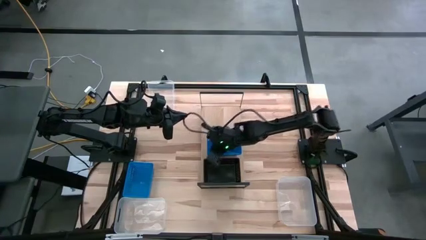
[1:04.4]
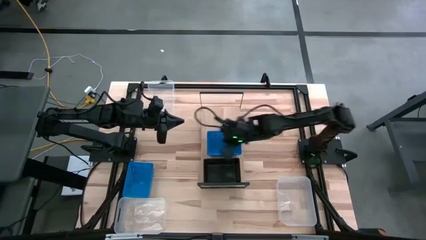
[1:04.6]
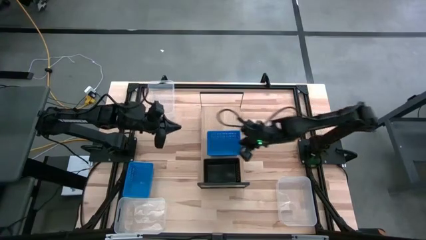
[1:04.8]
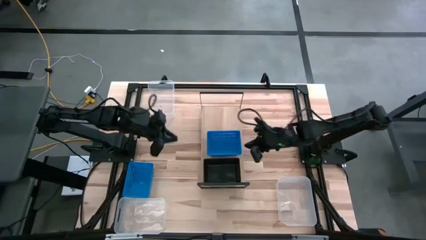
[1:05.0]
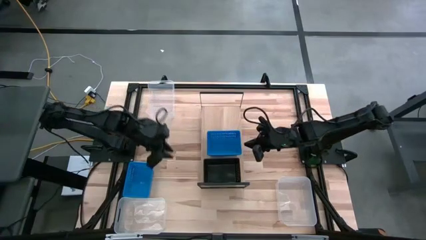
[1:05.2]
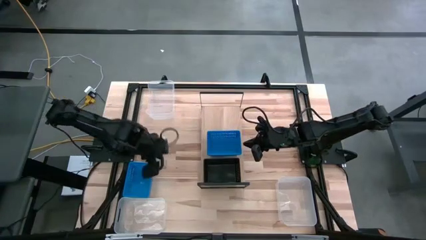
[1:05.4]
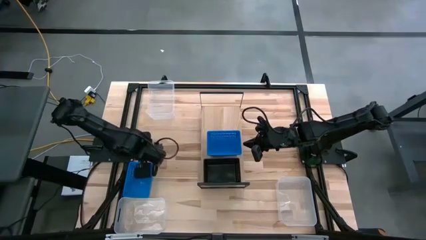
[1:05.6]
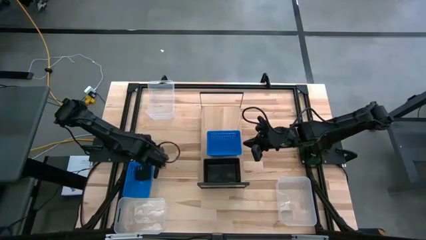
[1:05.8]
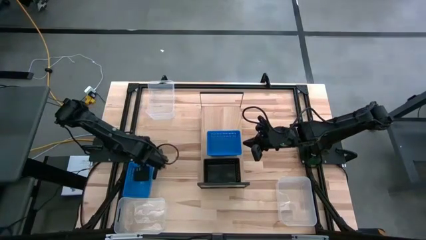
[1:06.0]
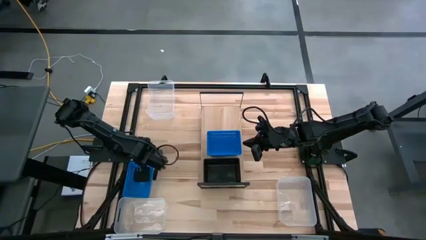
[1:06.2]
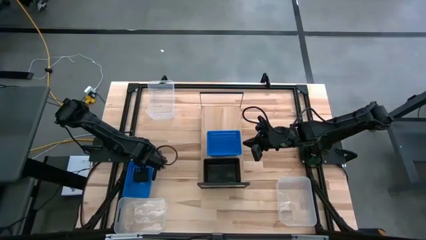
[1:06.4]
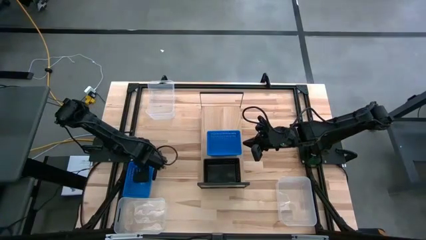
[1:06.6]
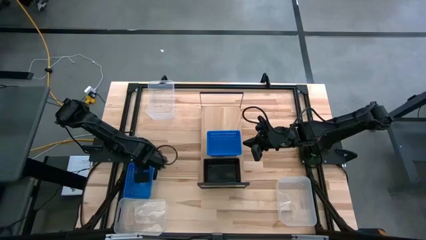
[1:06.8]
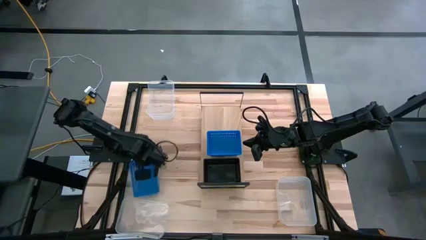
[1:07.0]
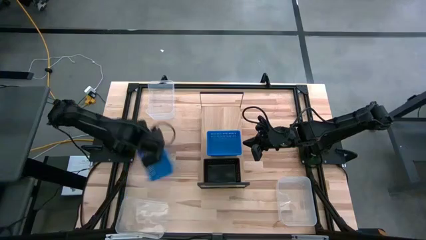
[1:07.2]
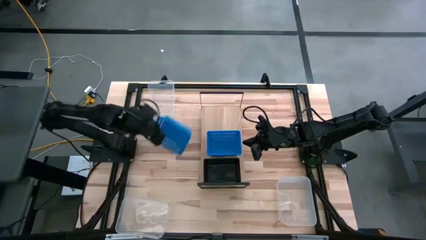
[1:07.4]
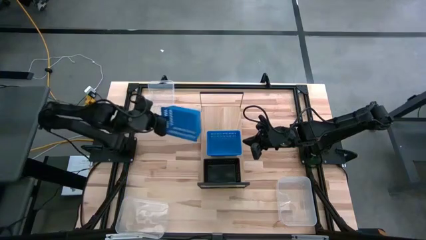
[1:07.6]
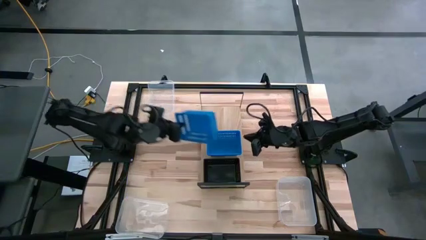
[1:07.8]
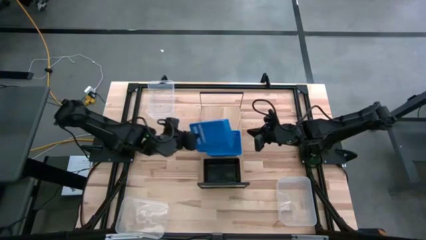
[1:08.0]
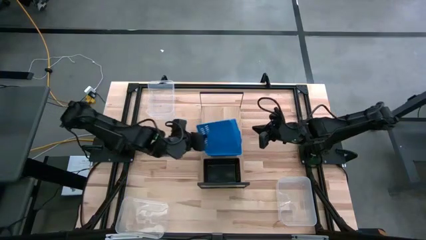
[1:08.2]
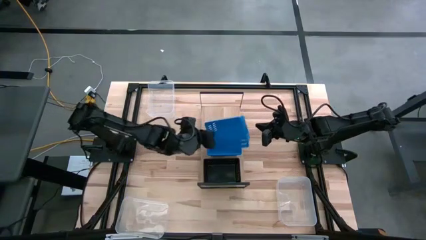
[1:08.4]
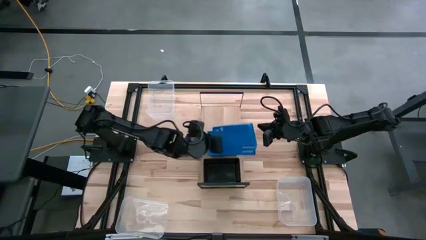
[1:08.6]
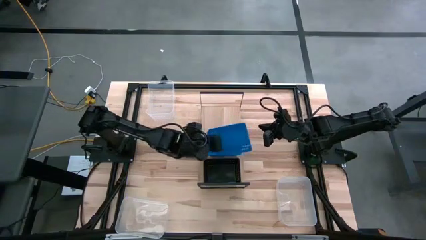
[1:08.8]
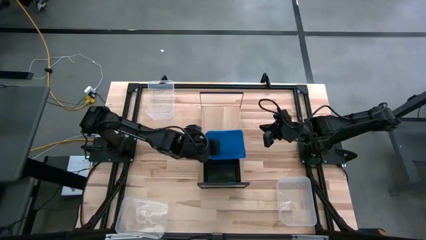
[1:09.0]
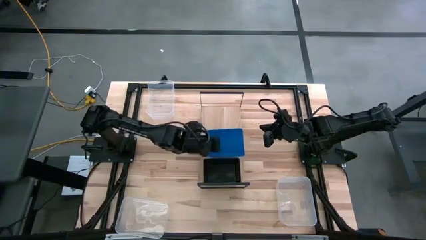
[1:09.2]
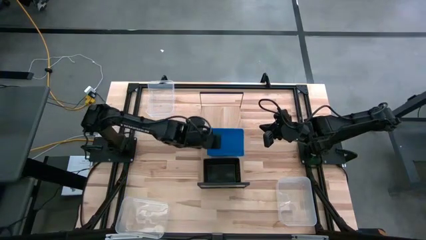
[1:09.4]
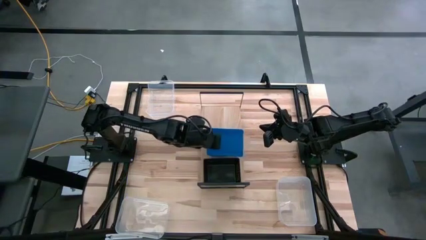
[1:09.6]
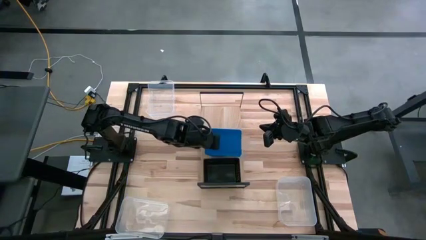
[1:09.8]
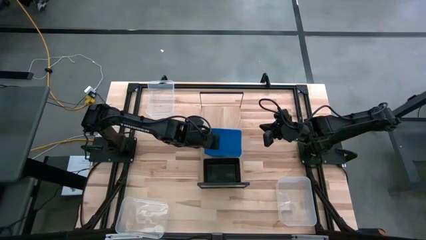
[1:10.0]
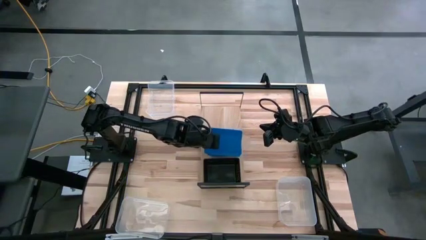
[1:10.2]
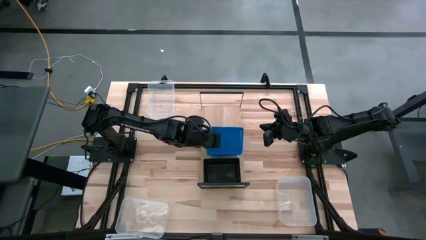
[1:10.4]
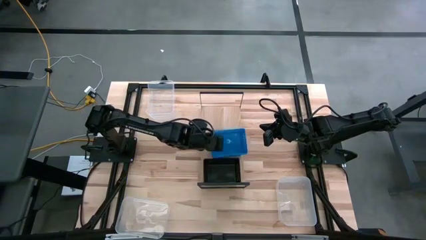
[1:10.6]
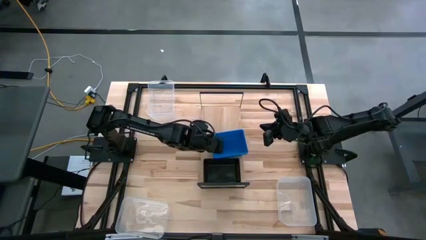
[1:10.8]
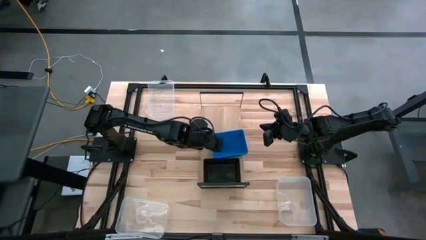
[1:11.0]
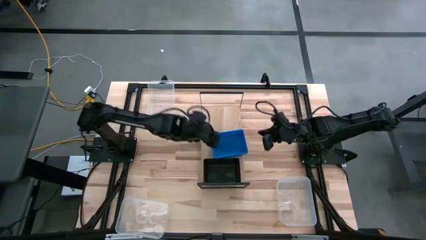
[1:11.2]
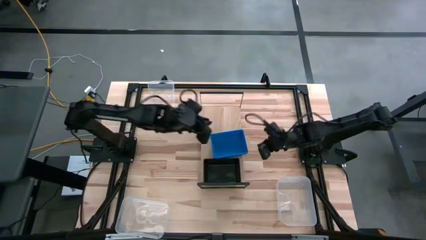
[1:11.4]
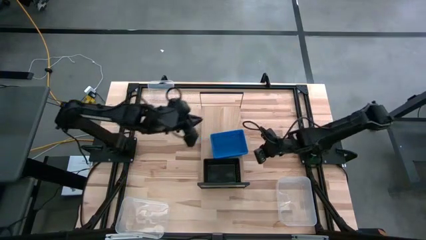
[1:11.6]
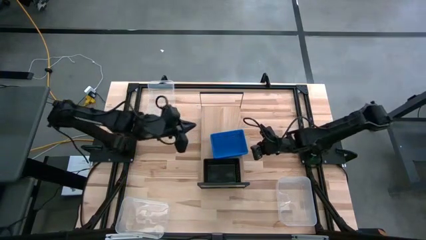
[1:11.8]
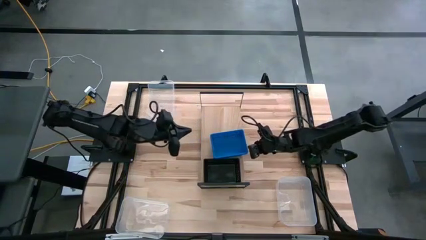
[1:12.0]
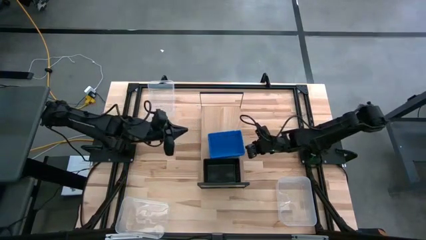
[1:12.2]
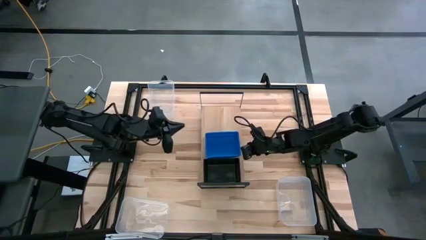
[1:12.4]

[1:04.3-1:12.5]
Task: Stack baskets on shelf by color
Stack the blue bin on top of the other blue bin on the shelf

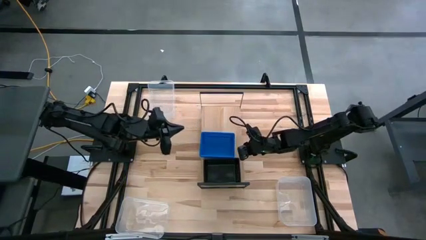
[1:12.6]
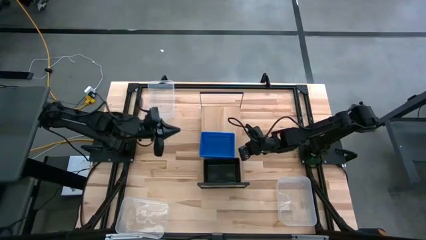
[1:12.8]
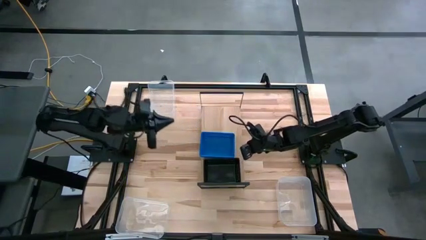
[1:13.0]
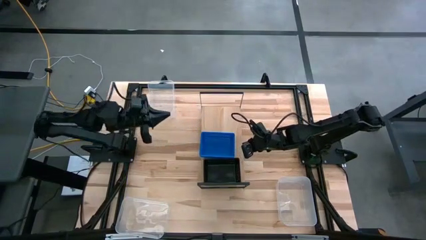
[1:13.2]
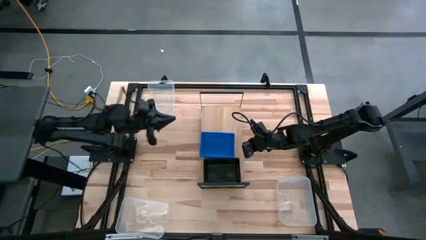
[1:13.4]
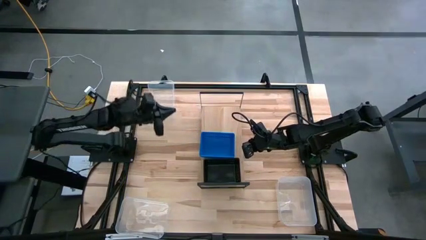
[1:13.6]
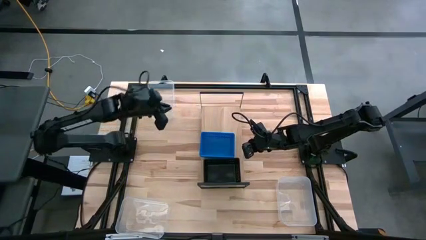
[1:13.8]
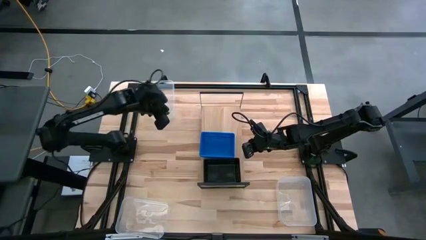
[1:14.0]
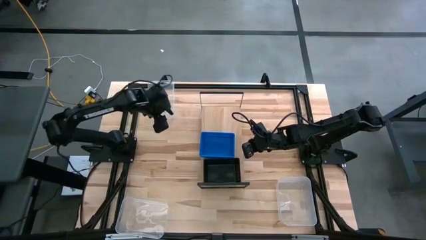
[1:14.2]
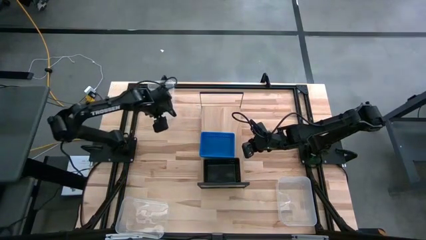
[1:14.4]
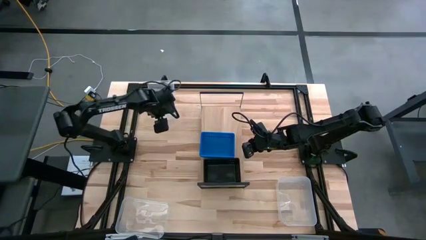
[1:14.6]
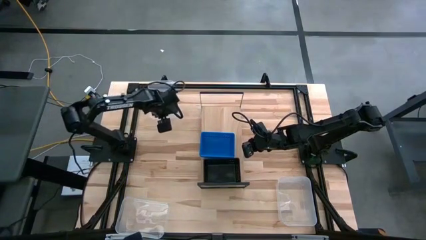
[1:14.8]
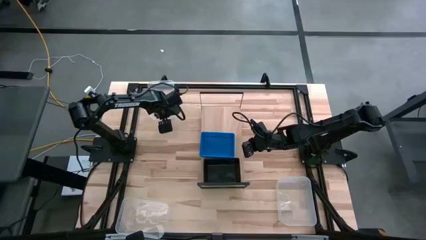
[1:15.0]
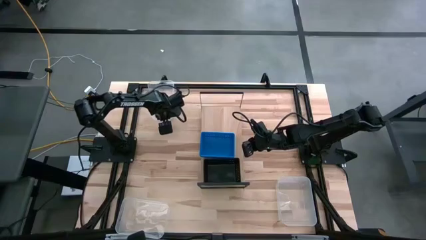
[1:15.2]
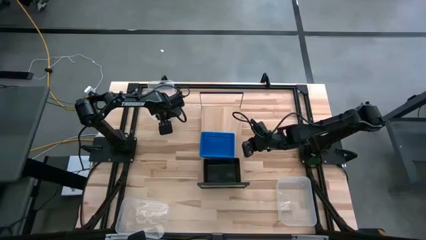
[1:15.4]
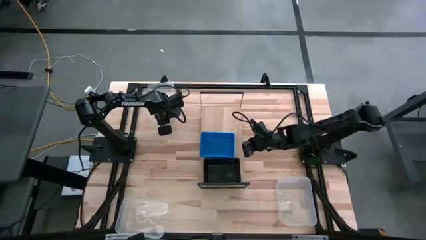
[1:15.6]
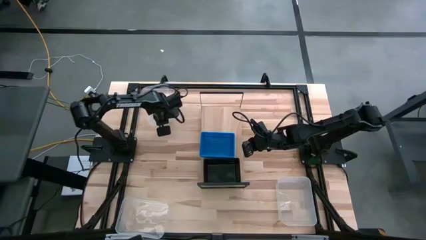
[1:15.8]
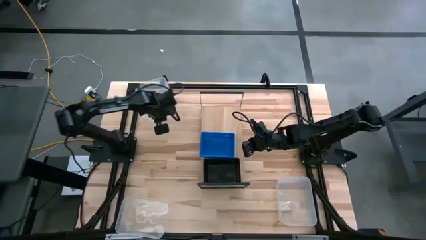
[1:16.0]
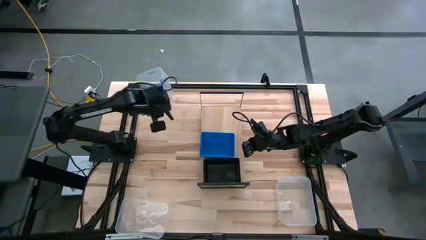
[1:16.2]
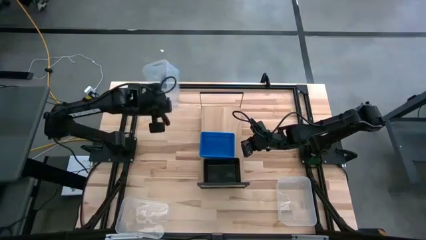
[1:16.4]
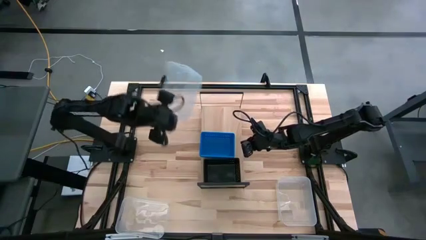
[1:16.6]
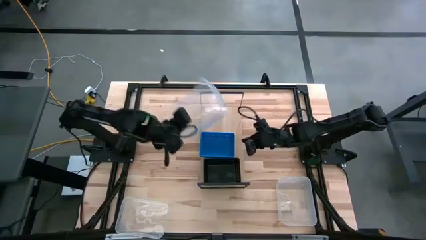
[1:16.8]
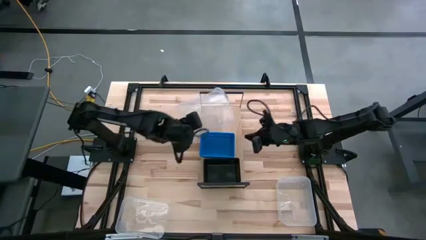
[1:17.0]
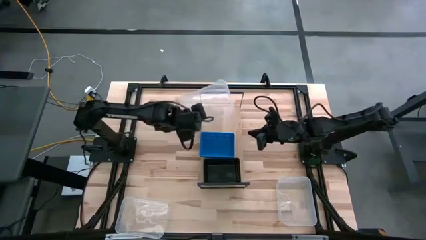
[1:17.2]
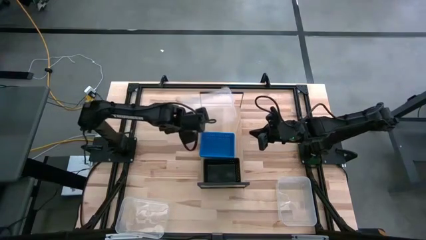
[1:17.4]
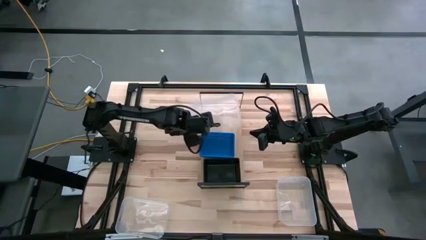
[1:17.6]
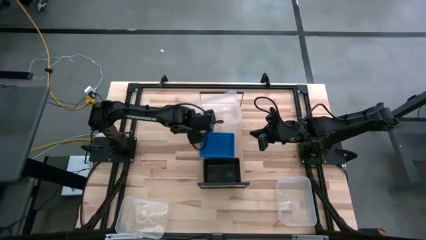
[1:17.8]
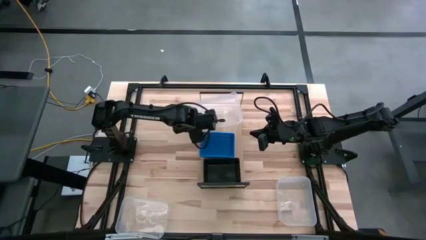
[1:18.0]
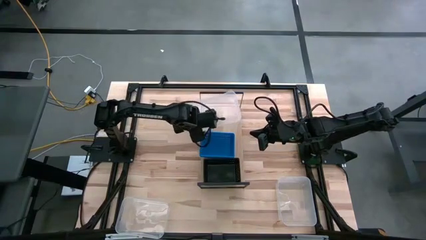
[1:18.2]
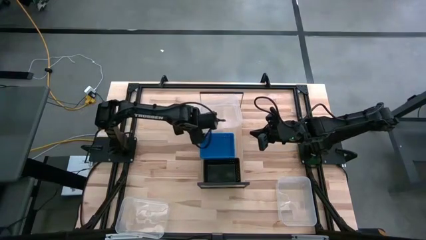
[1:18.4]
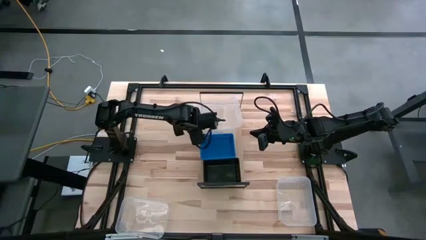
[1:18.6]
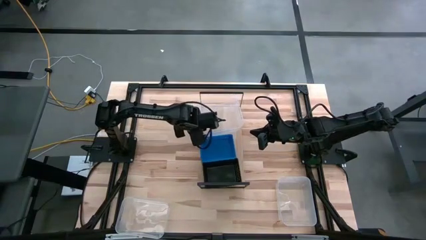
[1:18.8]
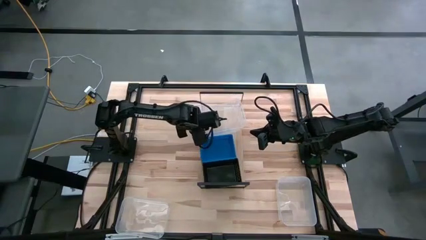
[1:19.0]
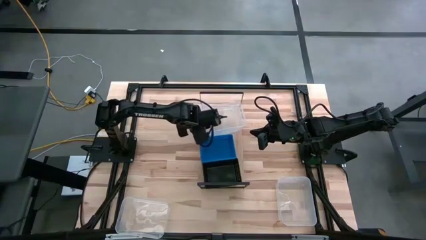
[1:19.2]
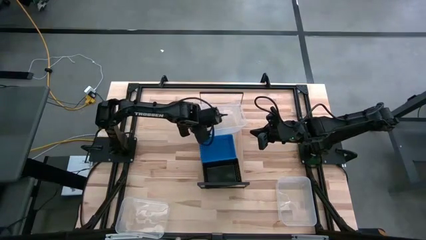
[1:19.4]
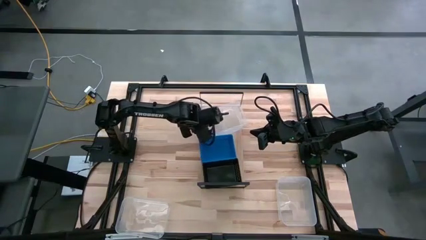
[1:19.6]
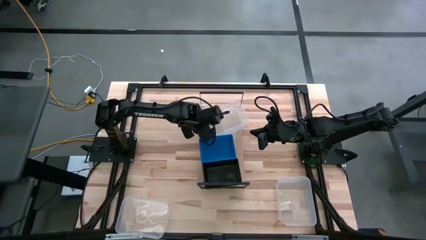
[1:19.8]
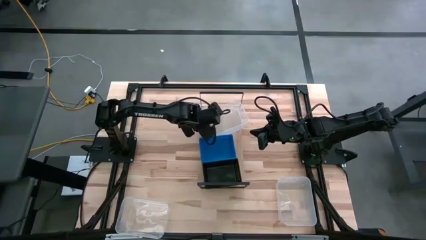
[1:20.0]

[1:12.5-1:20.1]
Put the top transparent bin on the shelf
